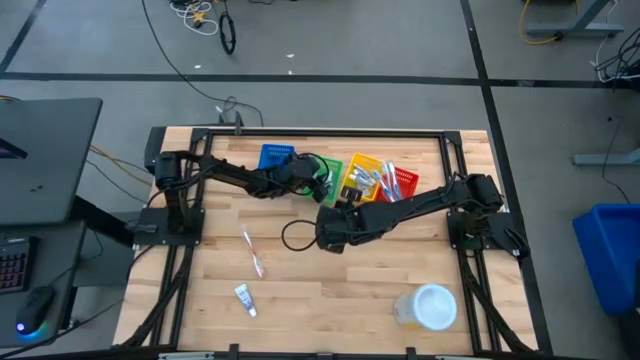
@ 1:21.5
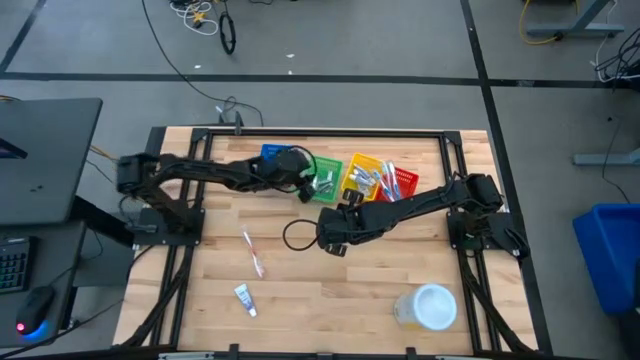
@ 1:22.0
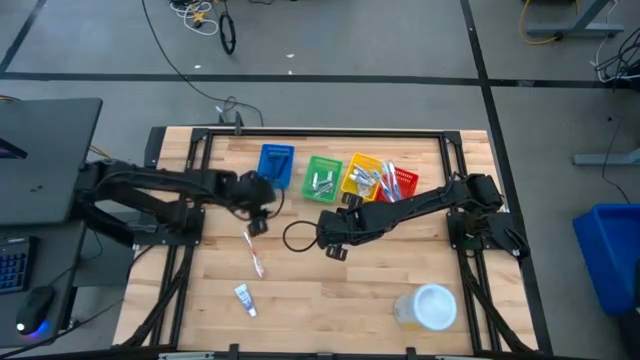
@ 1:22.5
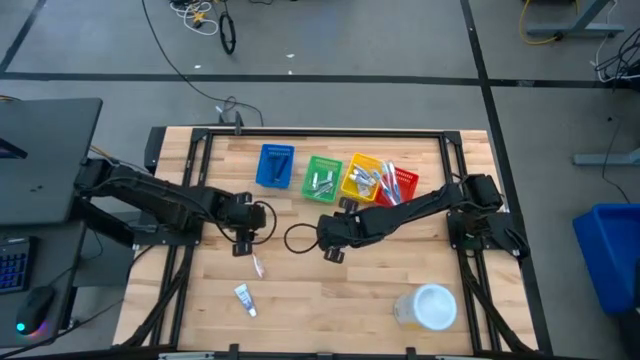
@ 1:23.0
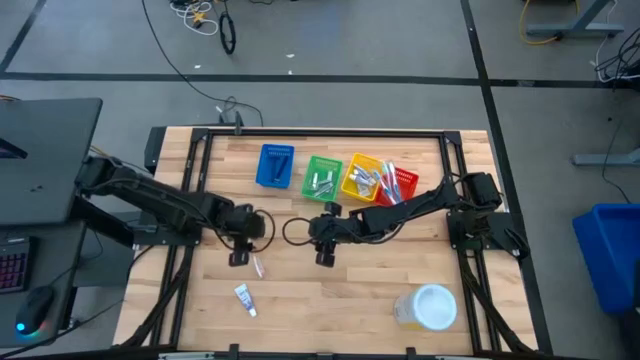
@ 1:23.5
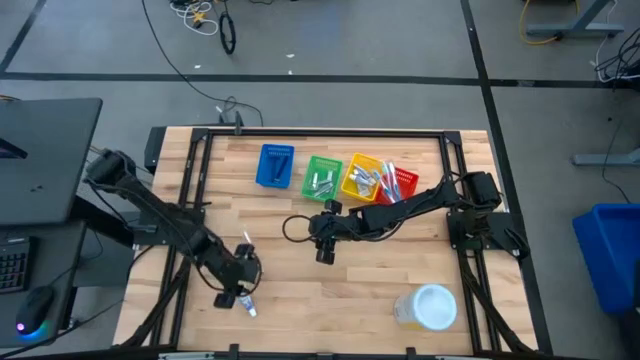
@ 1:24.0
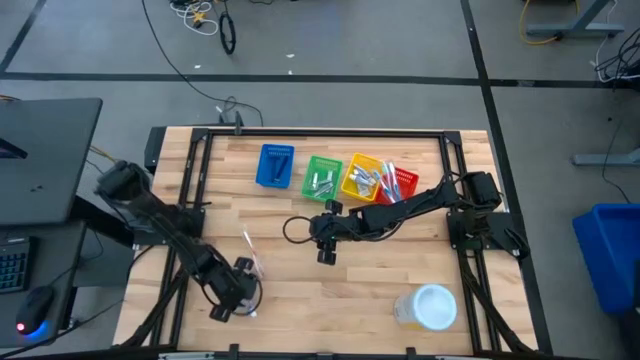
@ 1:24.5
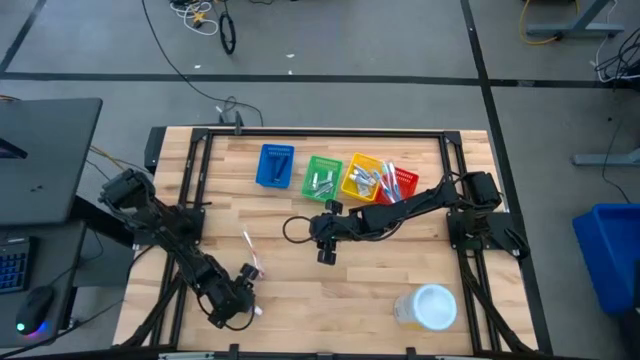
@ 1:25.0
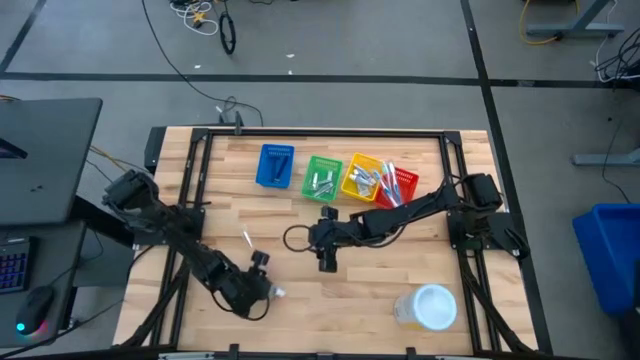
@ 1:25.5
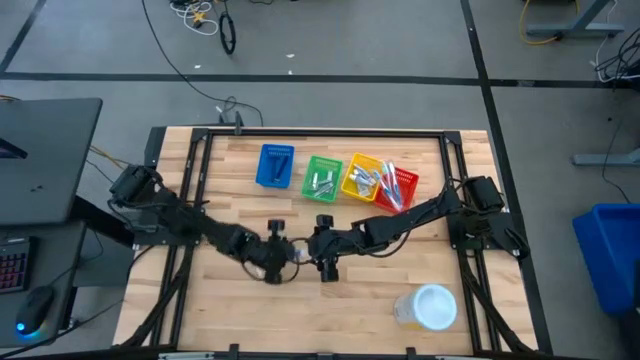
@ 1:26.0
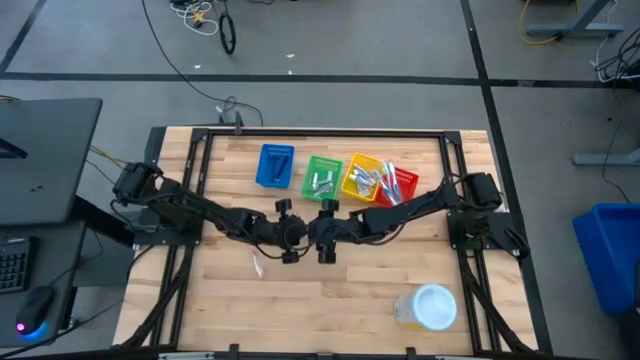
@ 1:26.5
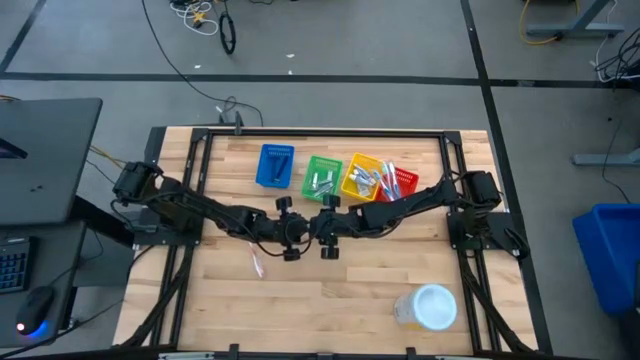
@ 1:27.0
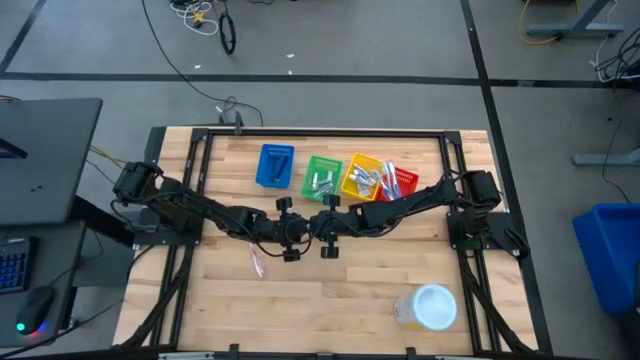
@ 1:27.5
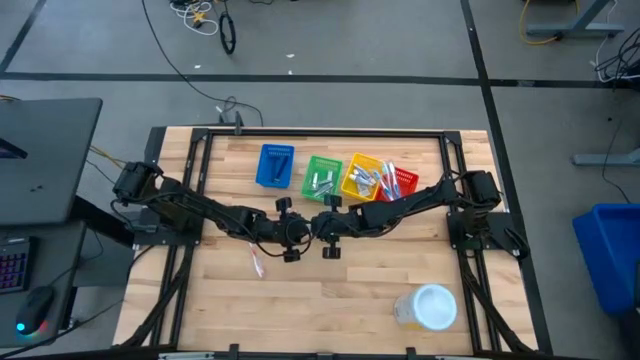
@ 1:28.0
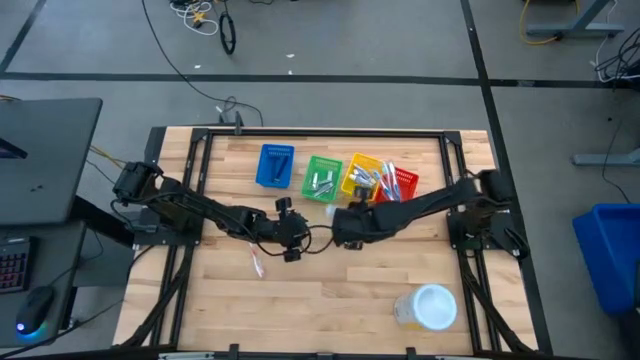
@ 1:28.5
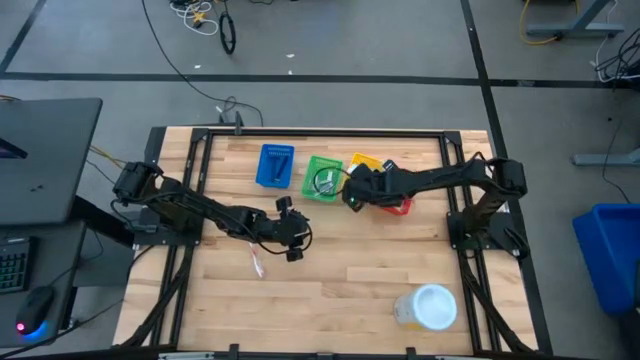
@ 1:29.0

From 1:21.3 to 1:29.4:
Task: Pick & Place Travel size toiletries
Put the white toothpaste into the yellow bin

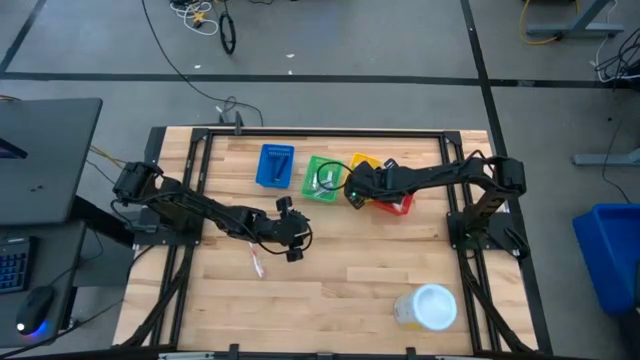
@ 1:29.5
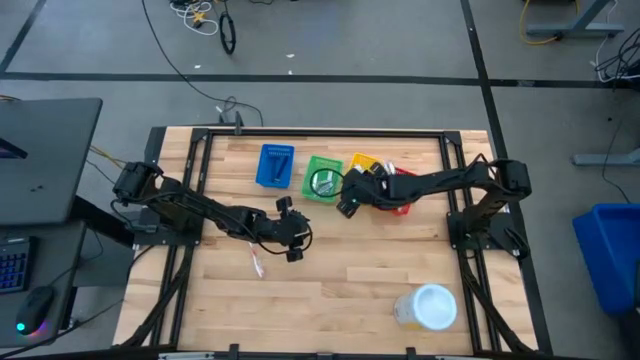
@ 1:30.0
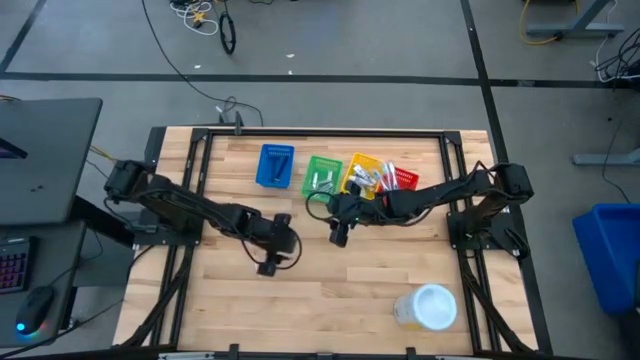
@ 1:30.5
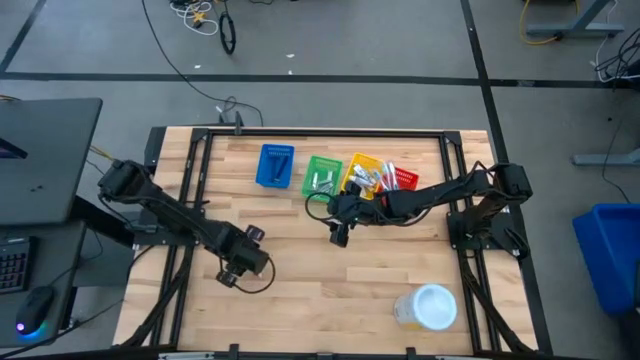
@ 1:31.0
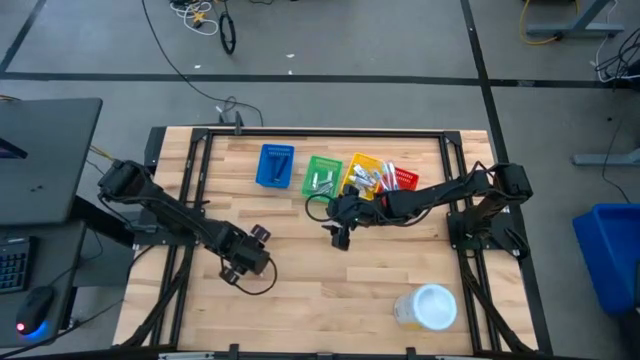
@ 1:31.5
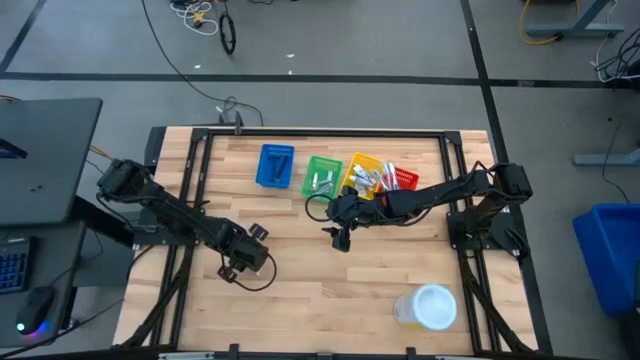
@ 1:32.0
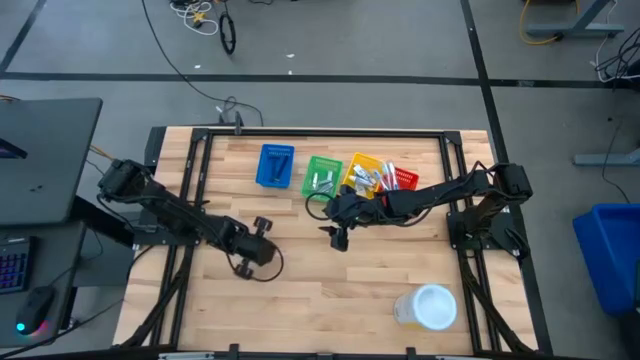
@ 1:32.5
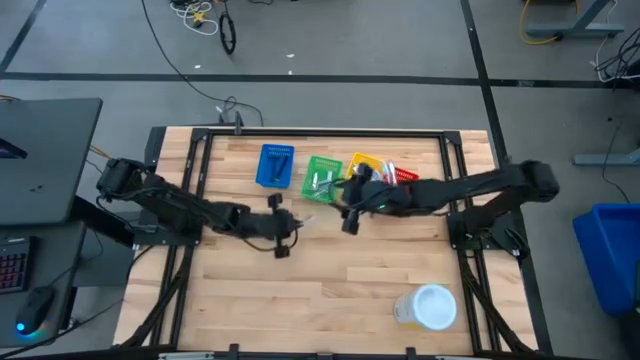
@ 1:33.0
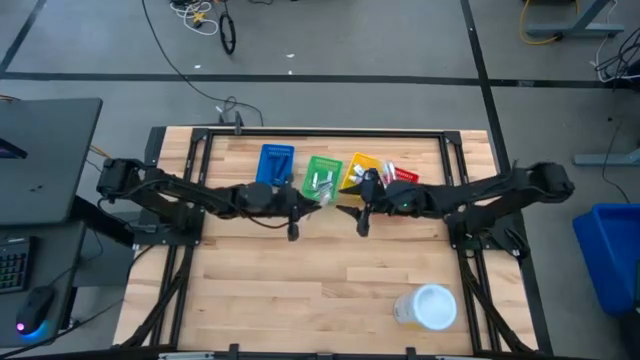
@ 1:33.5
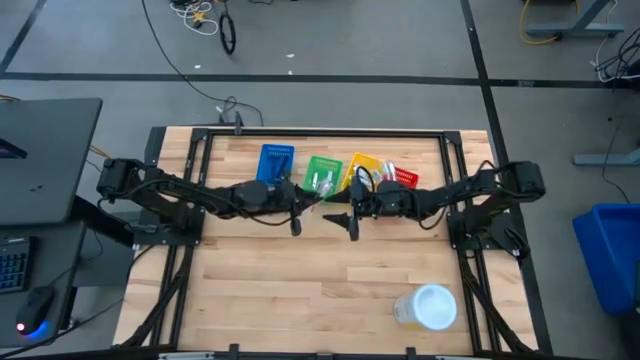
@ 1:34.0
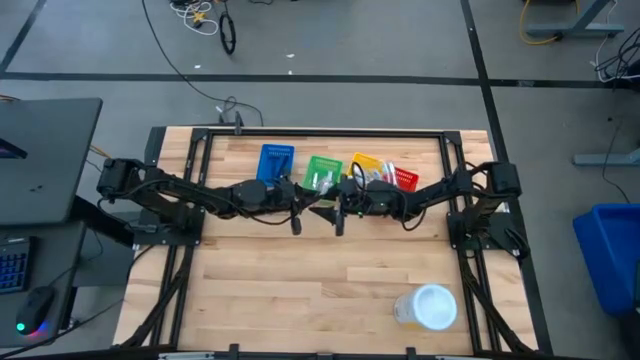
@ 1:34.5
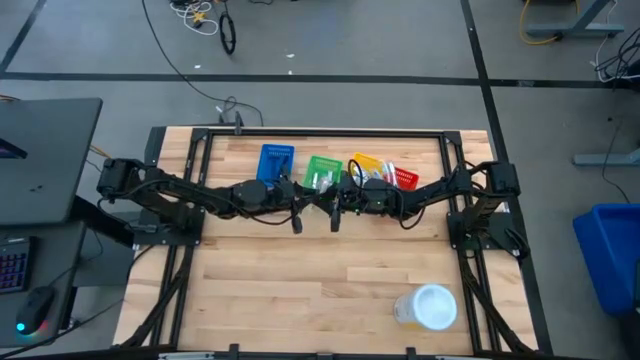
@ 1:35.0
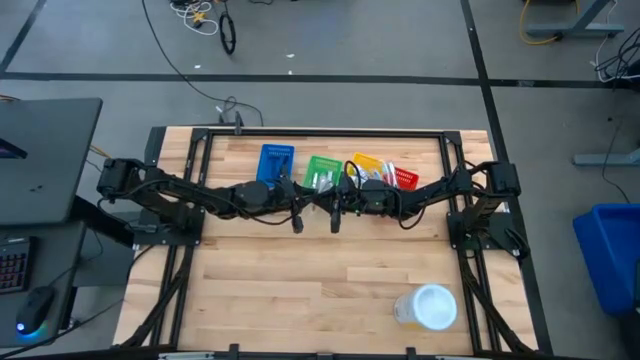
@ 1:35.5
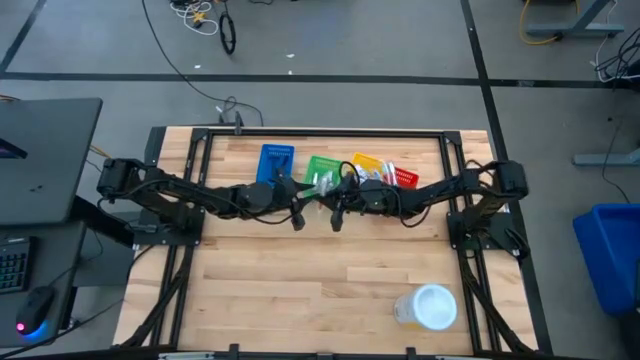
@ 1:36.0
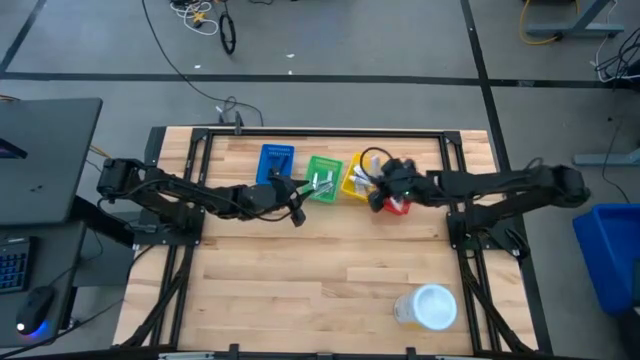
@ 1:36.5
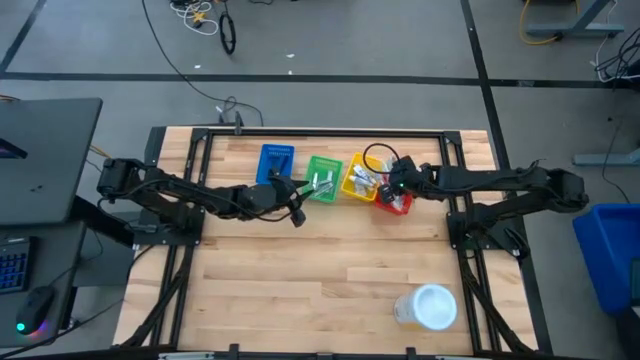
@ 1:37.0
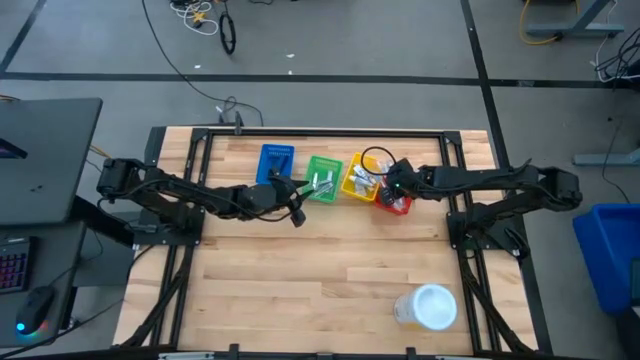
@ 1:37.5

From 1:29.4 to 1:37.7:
Put the red toothbrush into the red bin

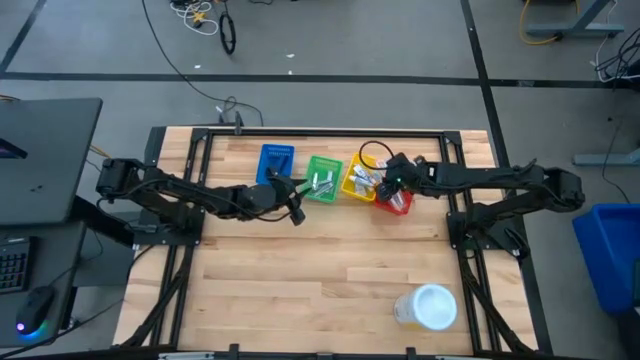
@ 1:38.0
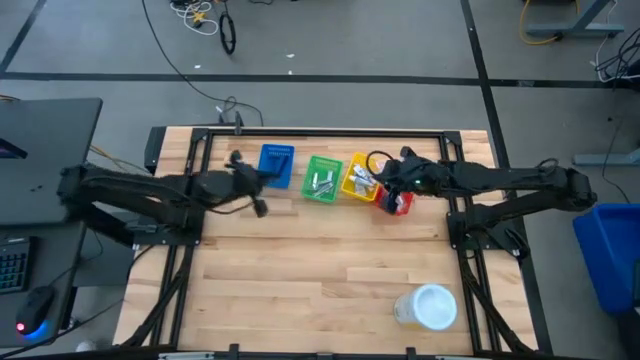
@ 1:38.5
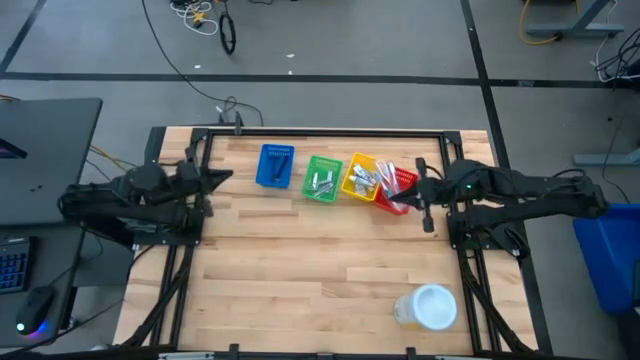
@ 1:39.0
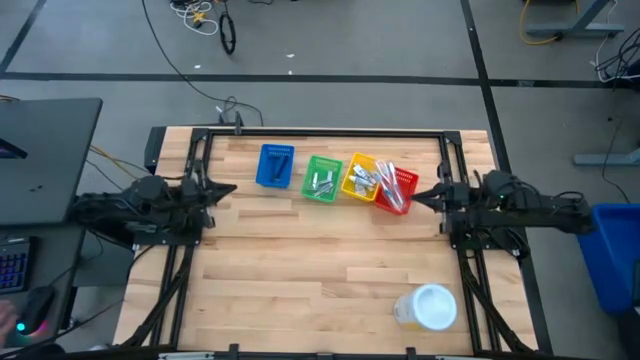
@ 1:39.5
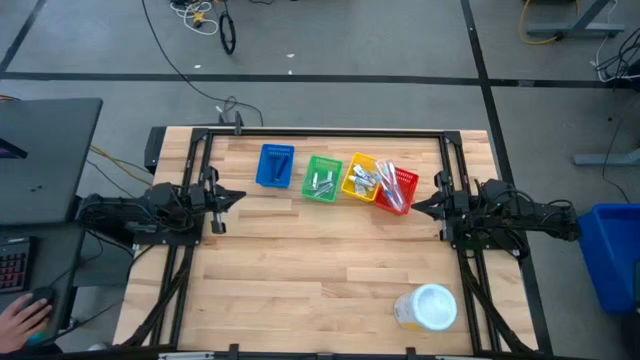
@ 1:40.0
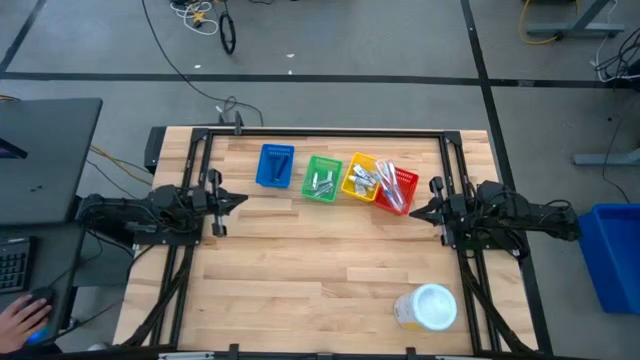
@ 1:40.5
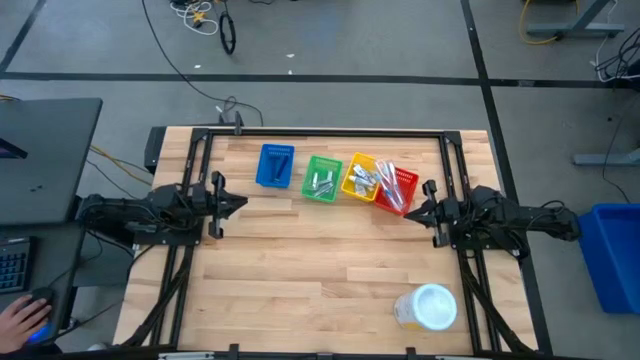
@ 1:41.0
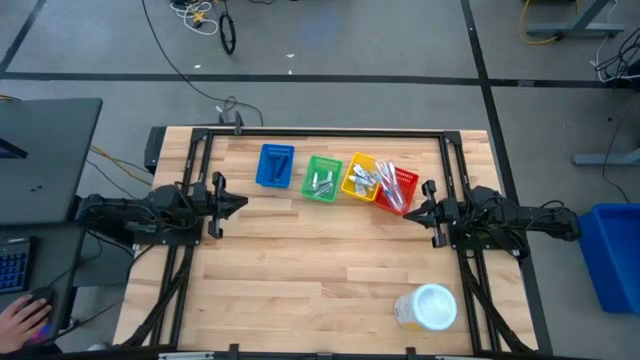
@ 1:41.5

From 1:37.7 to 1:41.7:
Return to Home Position
